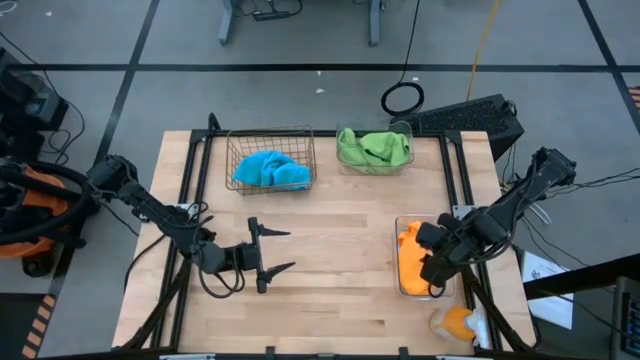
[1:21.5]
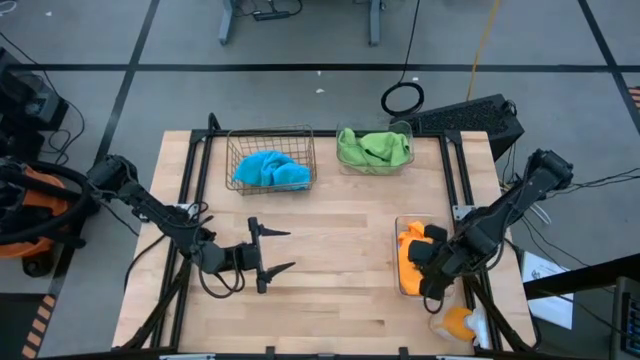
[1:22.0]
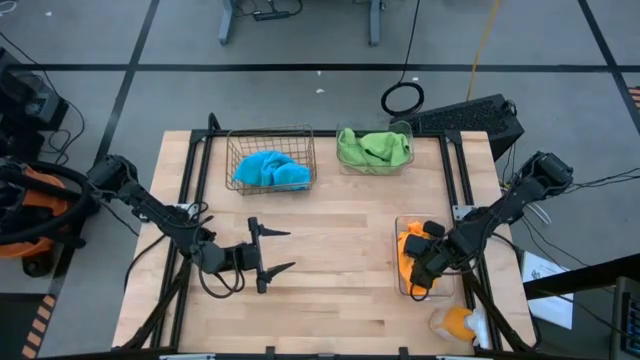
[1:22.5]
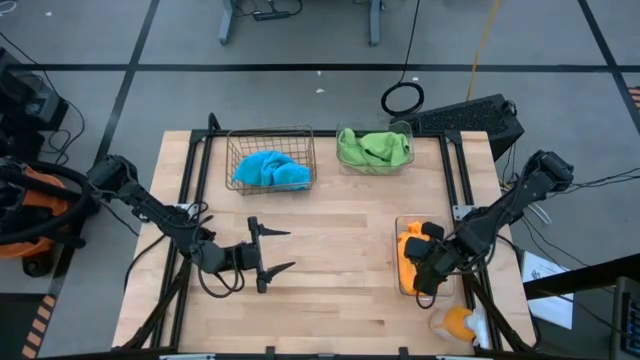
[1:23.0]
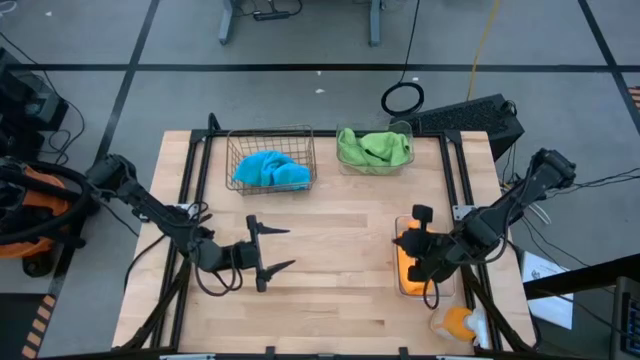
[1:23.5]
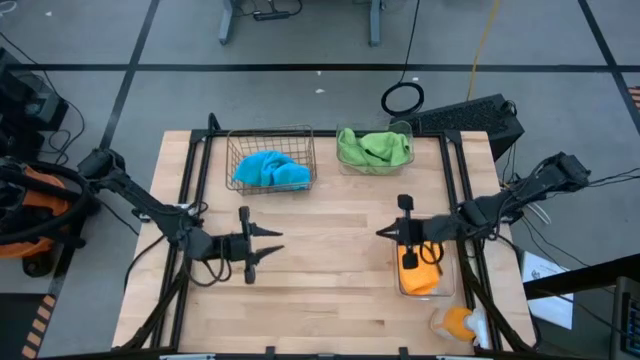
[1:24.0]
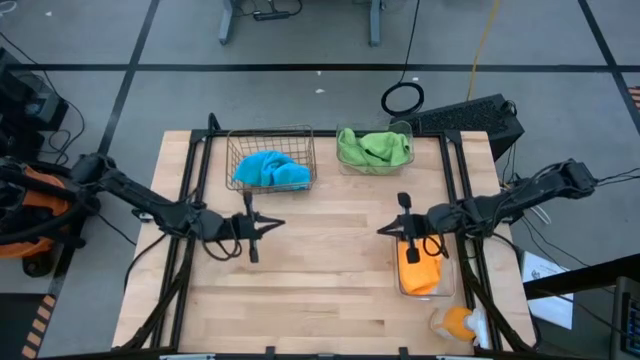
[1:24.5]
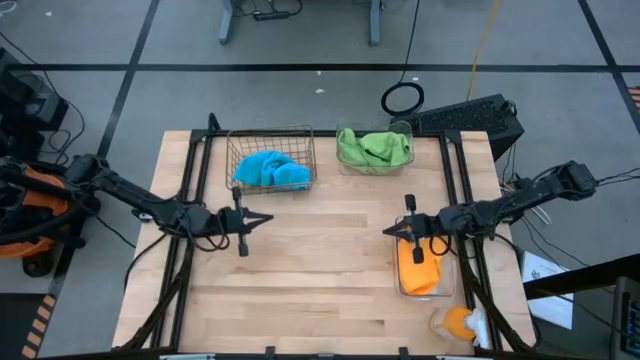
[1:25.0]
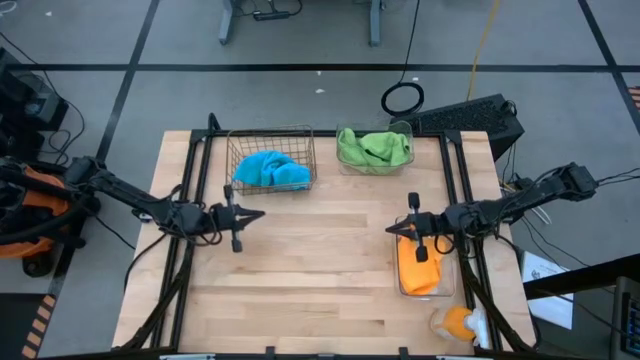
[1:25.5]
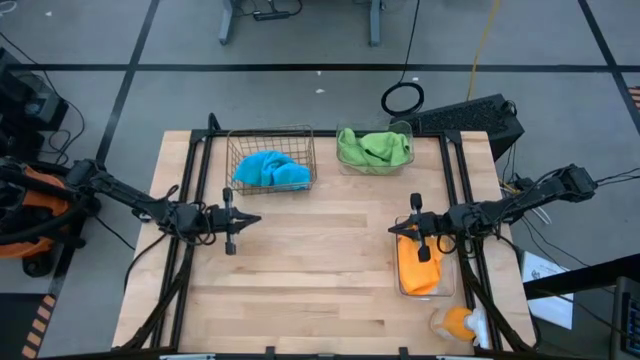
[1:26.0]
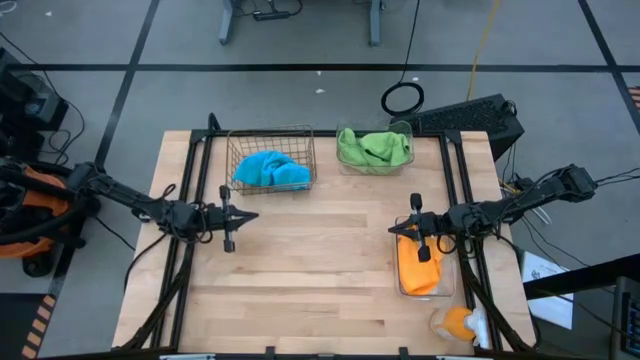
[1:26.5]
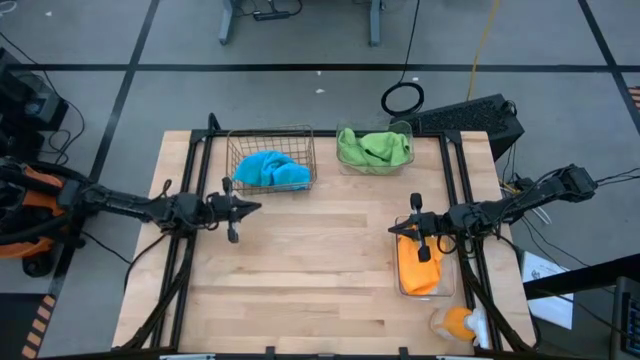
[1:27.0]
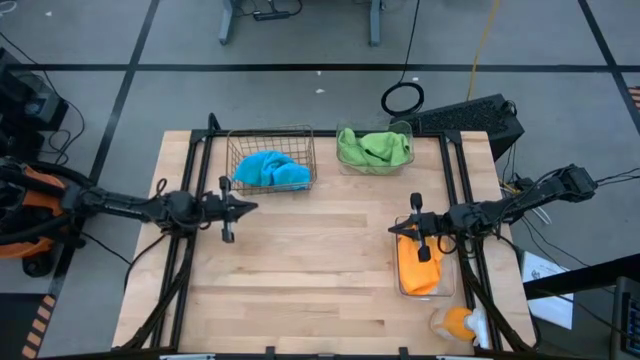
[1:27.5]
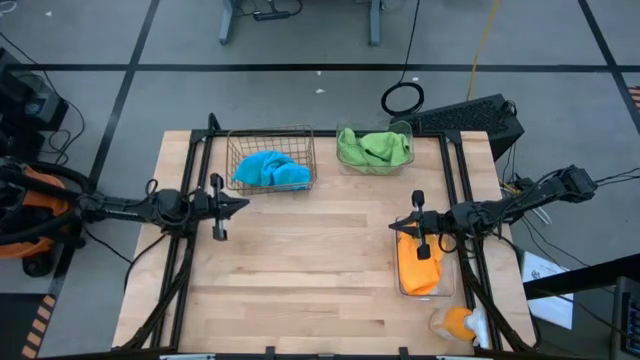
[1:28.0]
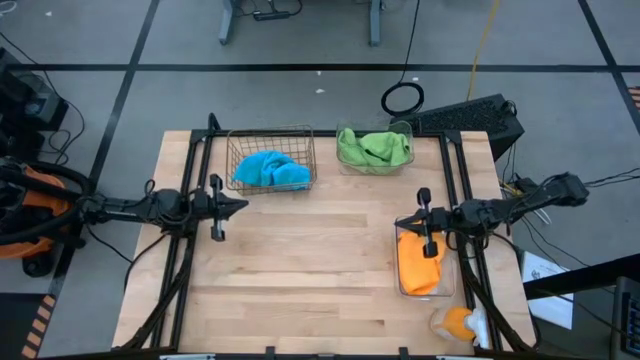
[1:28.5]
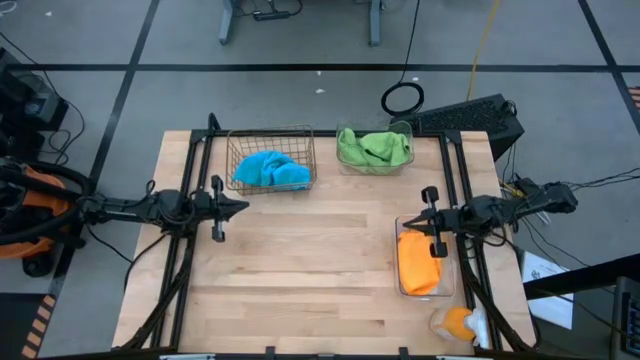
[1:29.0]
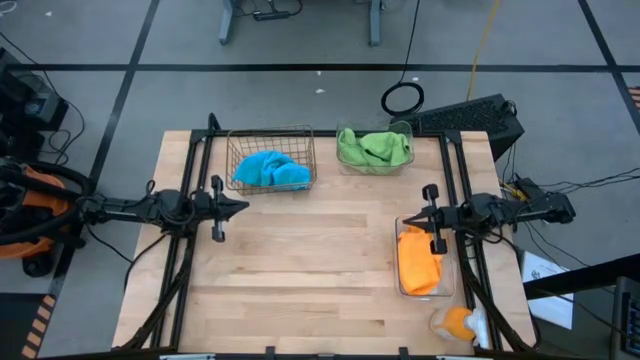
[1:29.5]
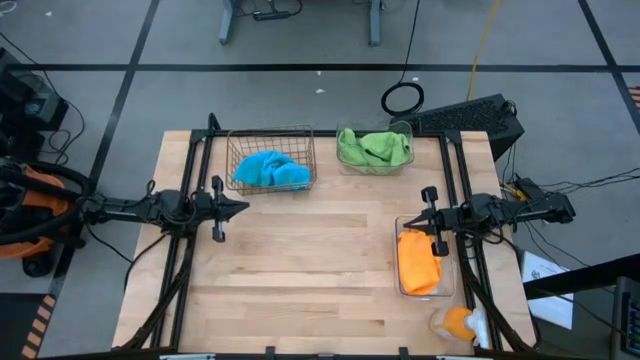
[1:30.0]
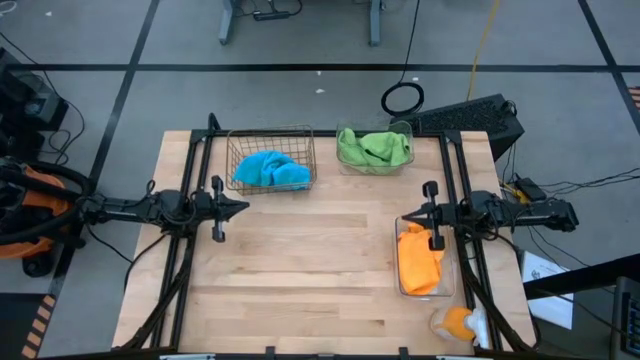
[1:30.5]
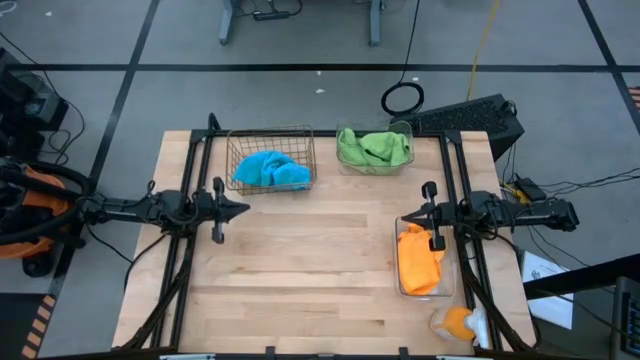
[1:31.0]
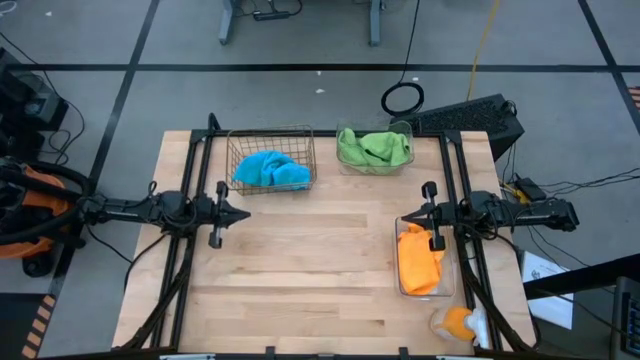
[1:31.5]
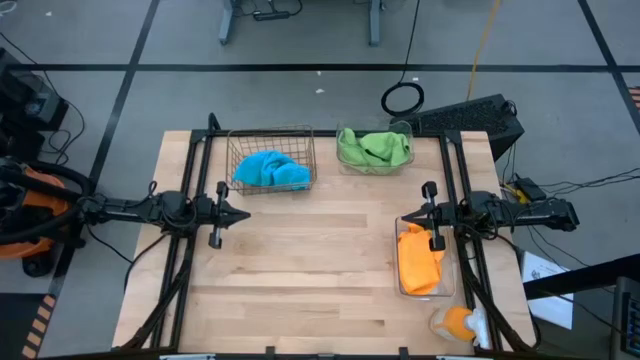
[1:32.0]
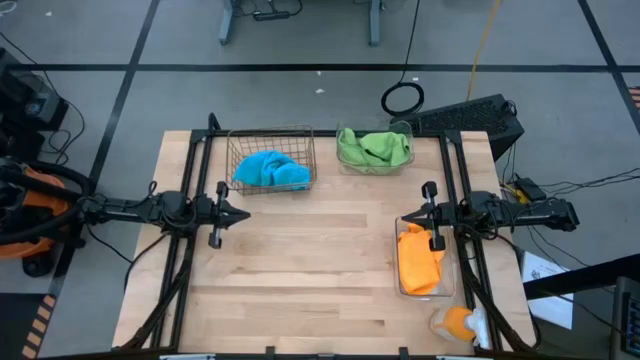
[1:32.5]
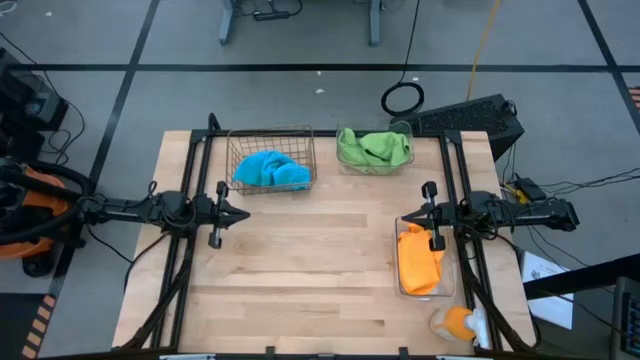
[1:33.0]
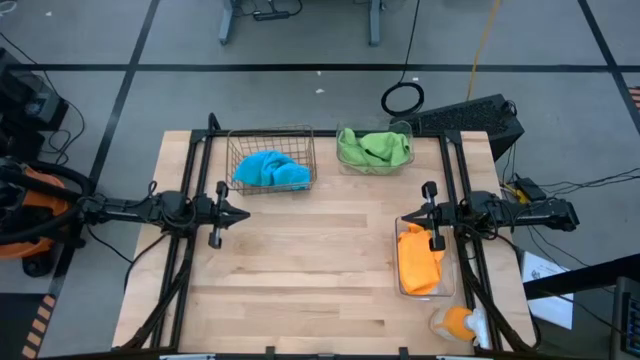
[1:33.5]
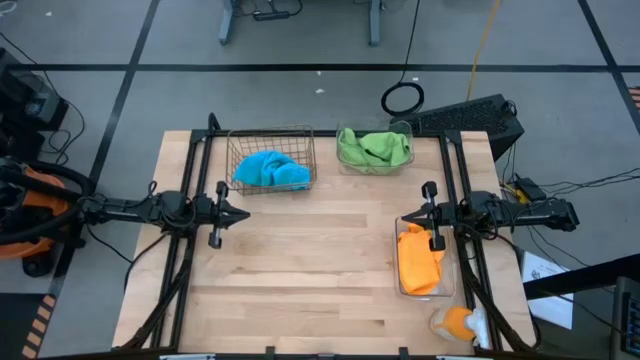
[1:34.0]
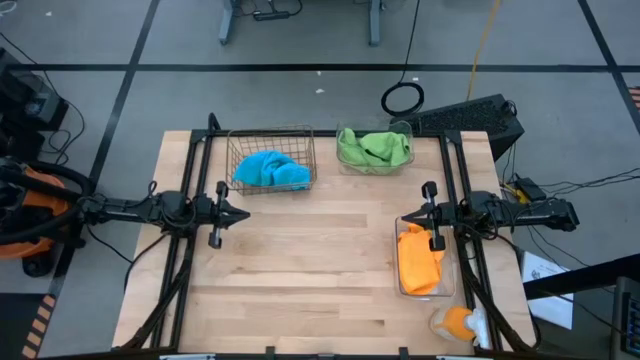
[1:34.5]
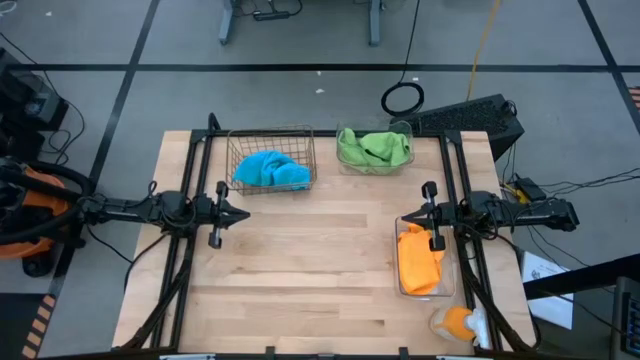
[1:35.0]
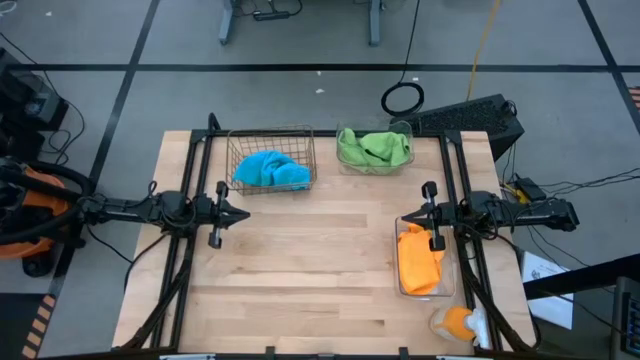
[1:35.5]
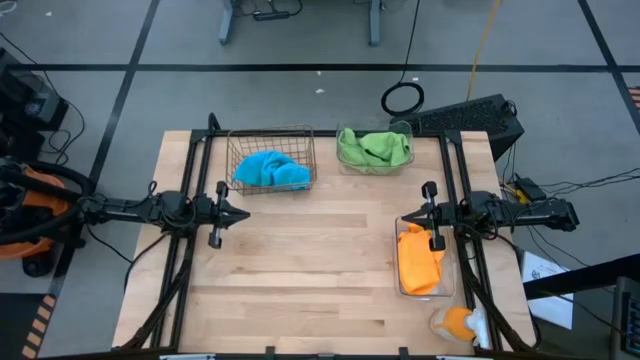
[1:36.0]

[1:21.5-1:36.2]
Task: Sort microfiber towel by color & place in baskets
Return to Home Position
